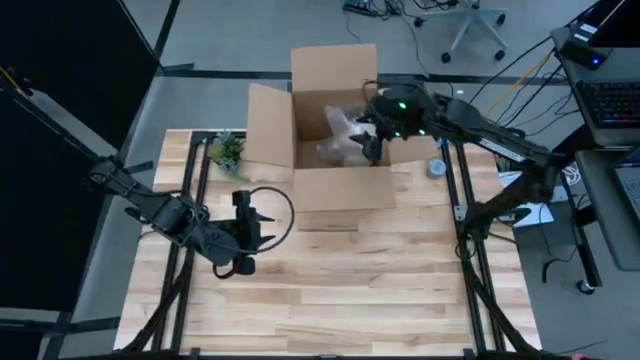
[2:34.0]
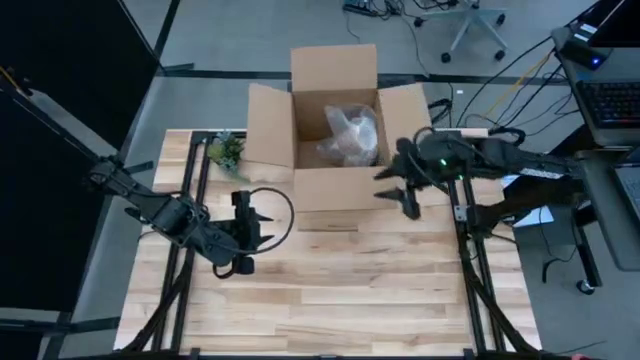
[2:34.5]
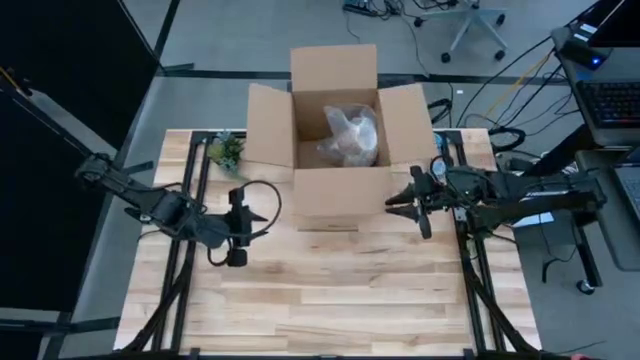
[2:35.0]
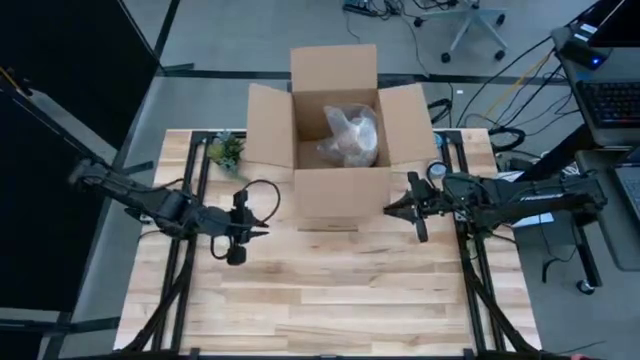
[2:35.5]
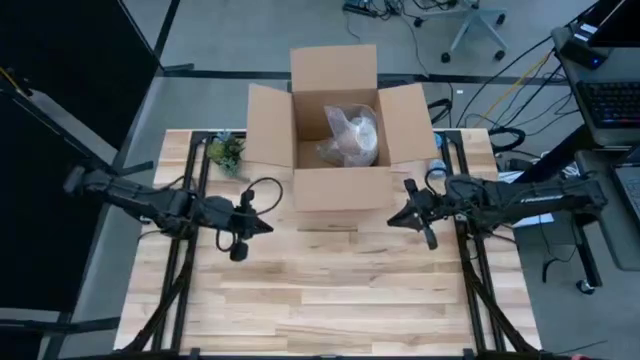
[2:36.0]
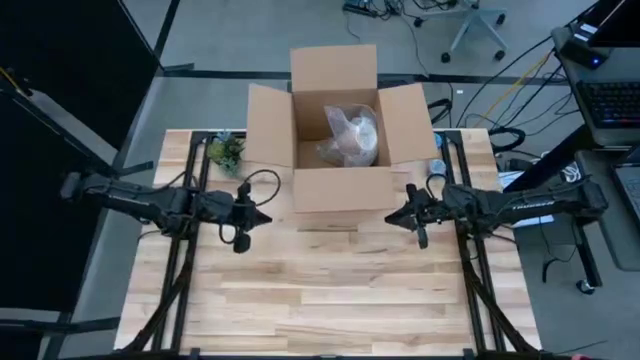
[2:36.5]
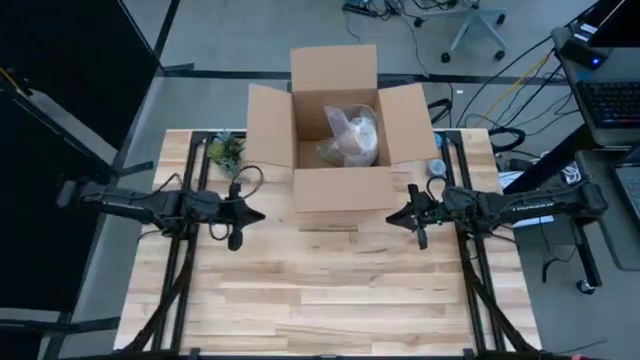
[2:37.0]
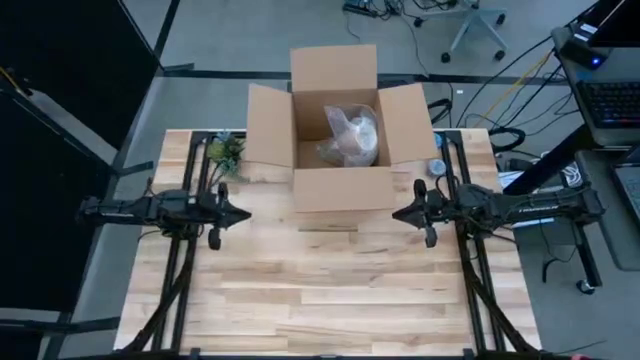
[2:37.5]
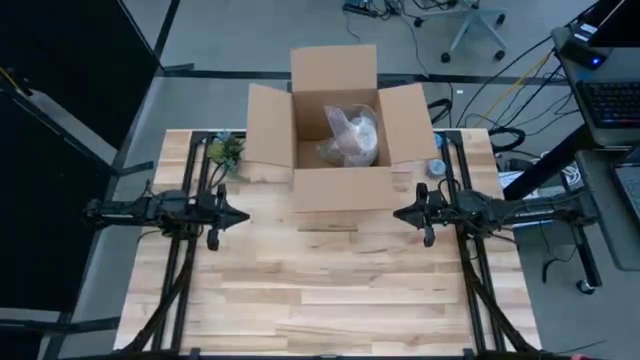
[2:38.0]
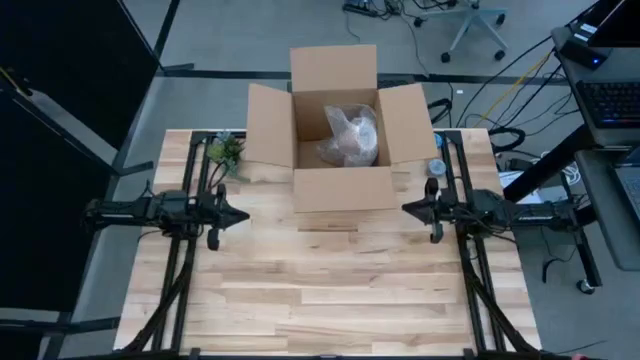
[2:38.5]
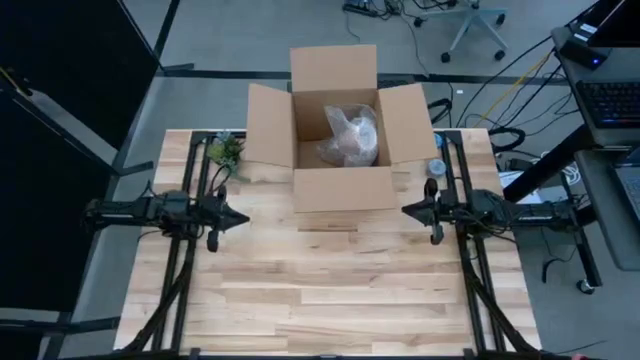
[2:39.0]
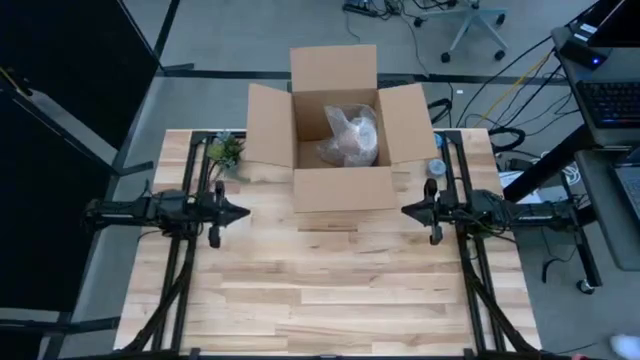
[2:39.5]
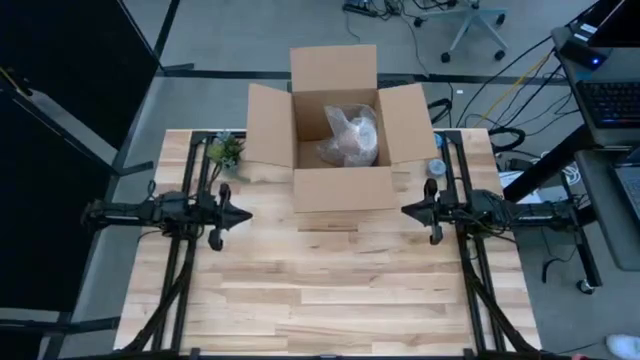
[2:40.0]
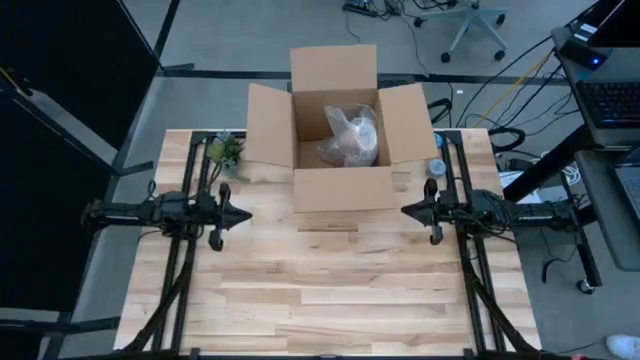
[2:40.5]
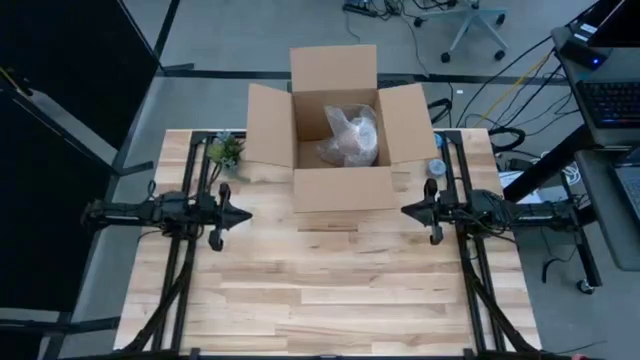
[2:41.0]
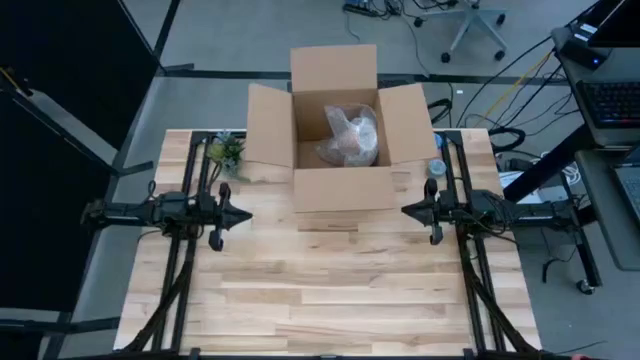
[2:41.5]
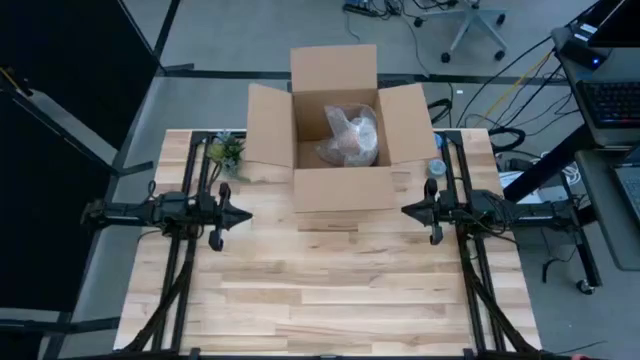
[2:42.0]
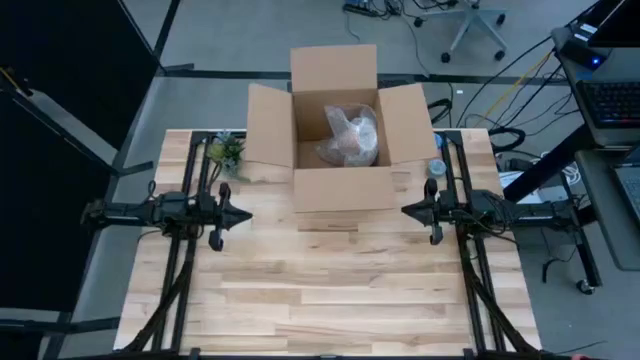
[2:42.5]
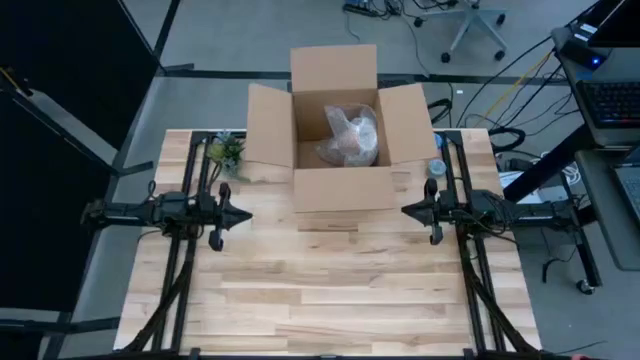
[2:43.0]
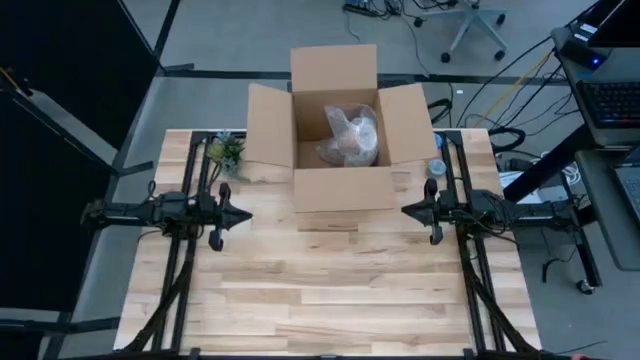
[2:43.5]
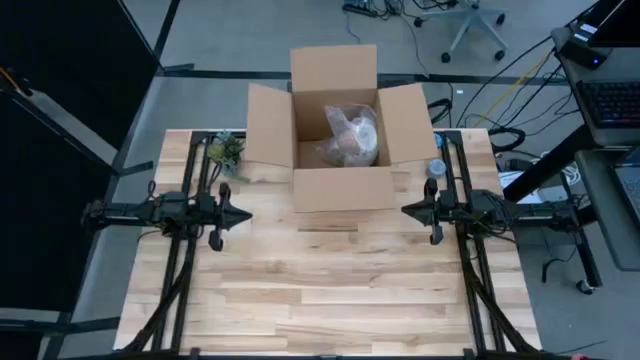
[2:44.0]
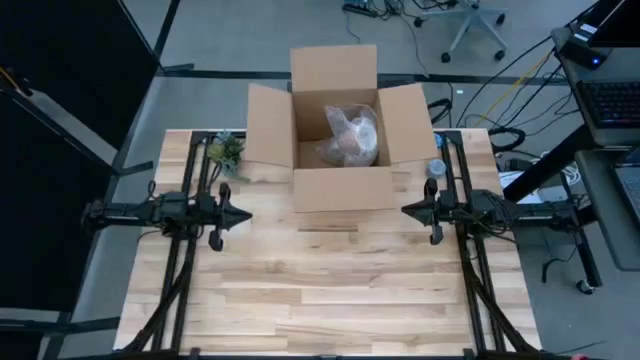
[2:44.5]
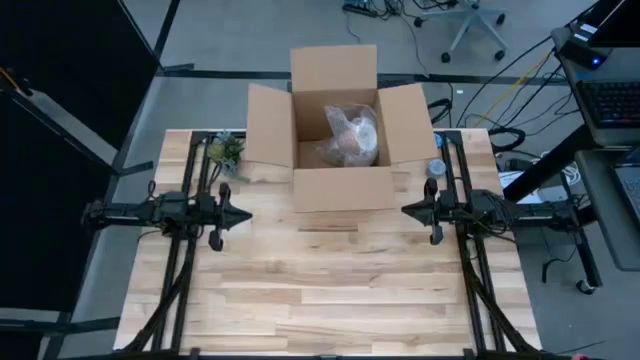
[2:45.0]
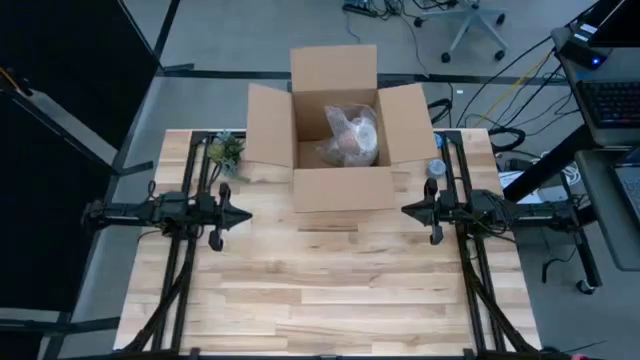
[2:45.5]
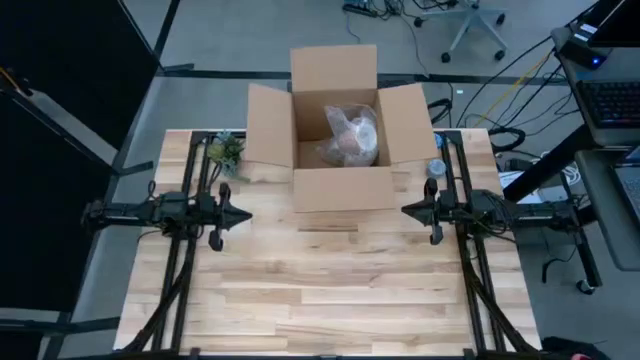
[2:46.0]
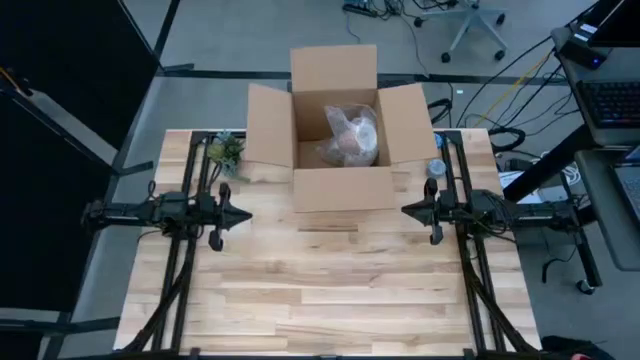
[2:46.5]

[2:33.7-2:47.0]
Task: wrap mug
Return to Home Position

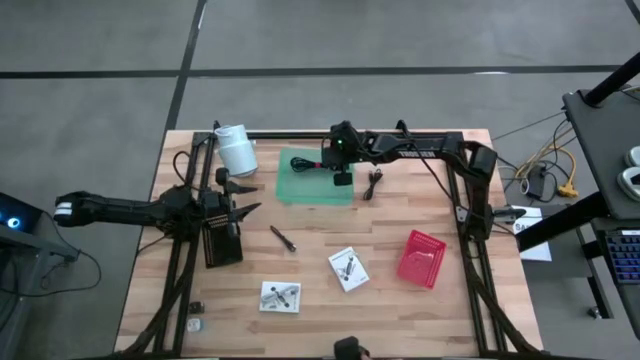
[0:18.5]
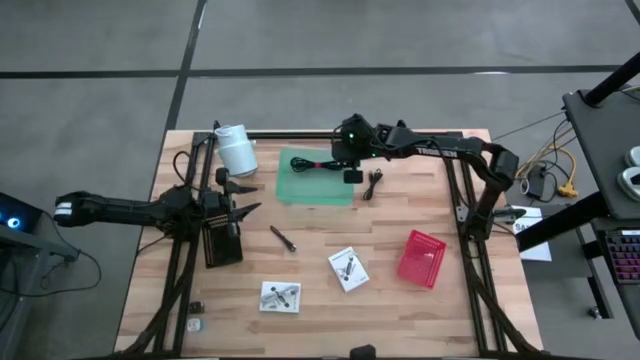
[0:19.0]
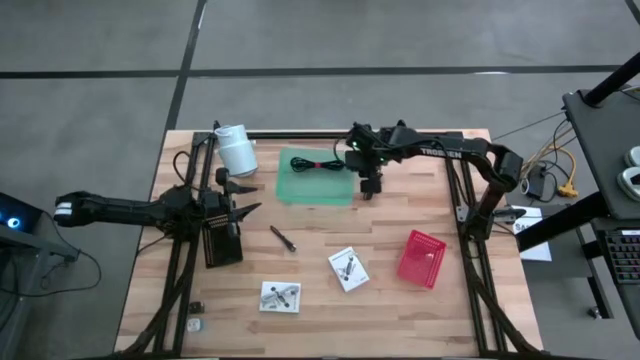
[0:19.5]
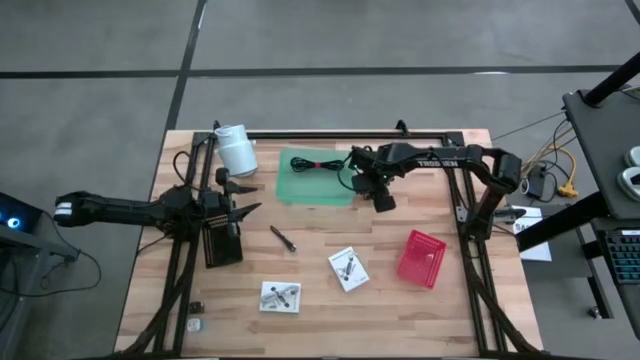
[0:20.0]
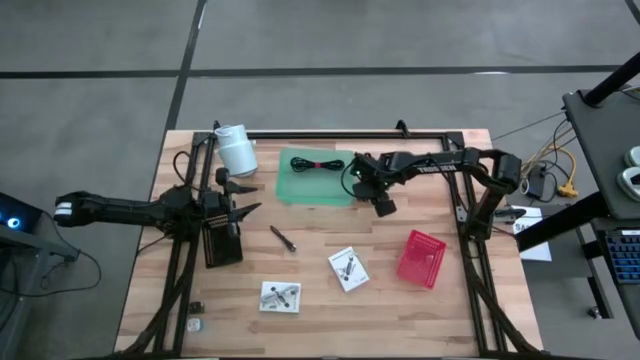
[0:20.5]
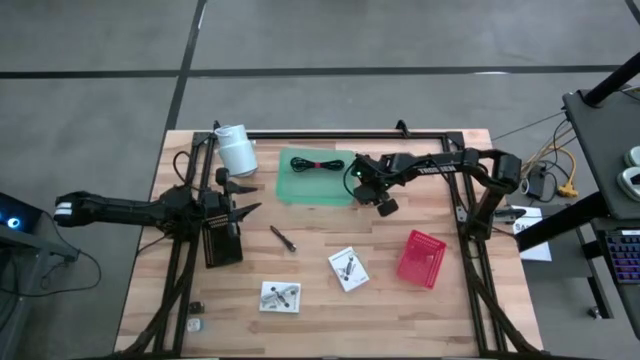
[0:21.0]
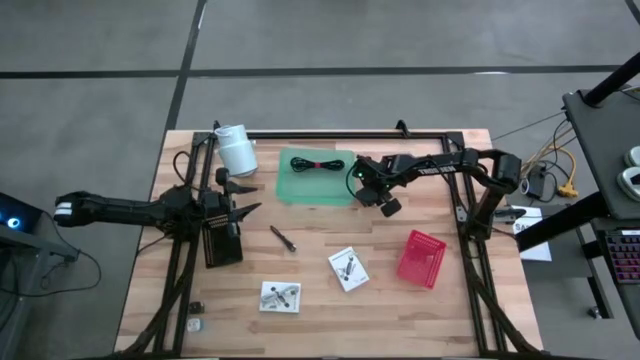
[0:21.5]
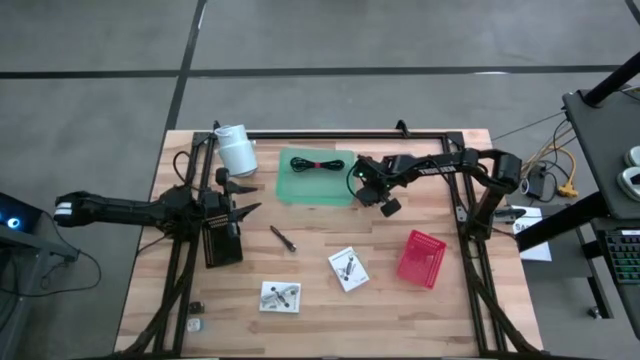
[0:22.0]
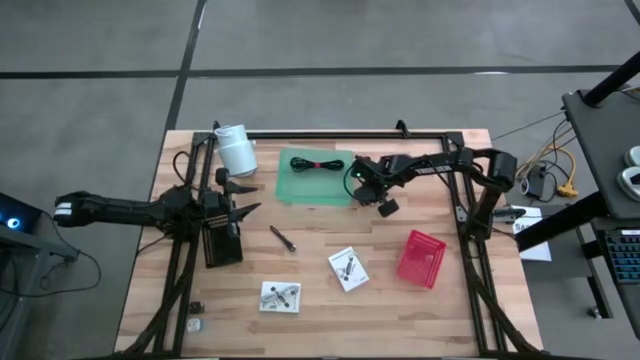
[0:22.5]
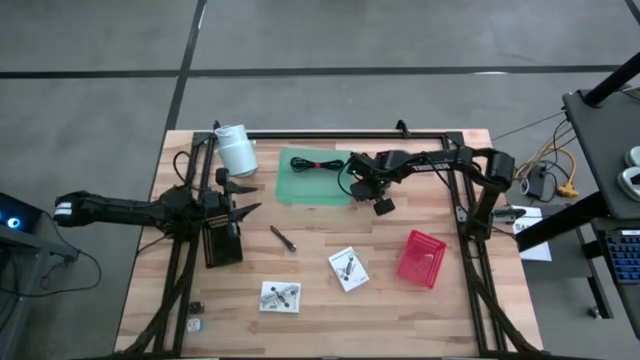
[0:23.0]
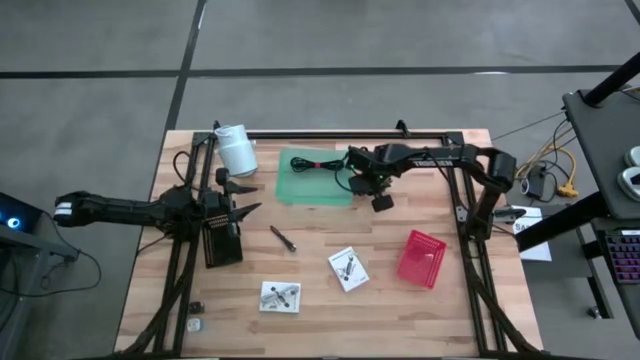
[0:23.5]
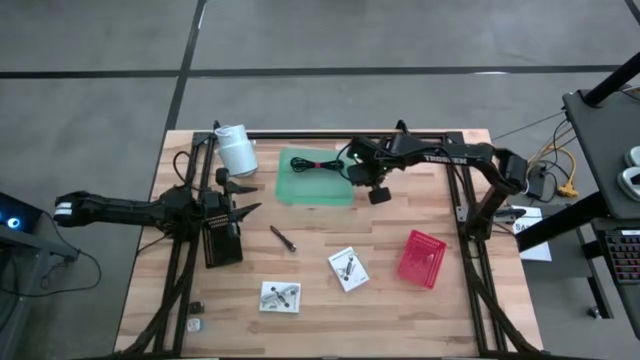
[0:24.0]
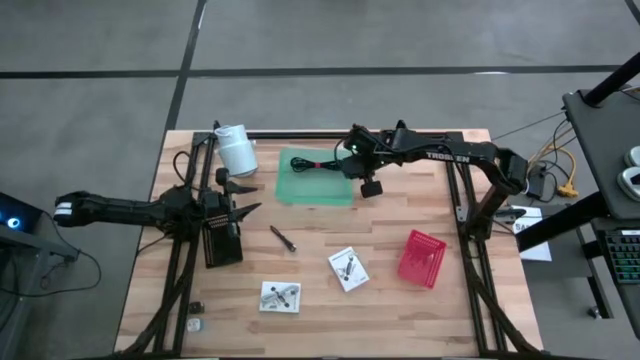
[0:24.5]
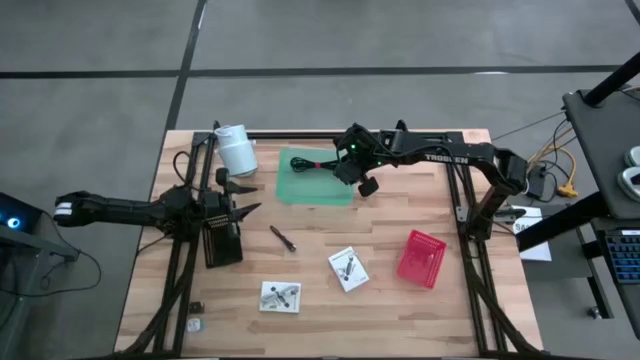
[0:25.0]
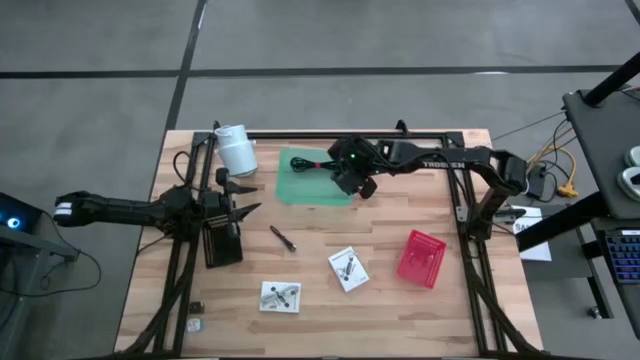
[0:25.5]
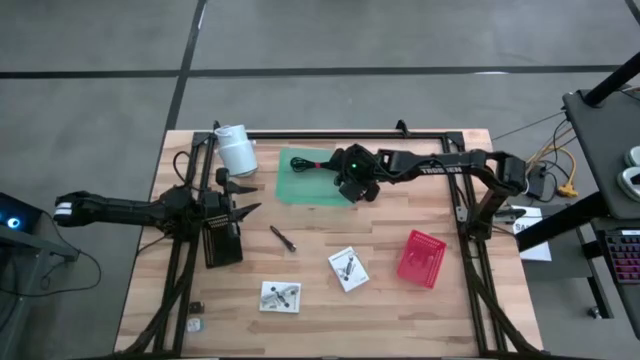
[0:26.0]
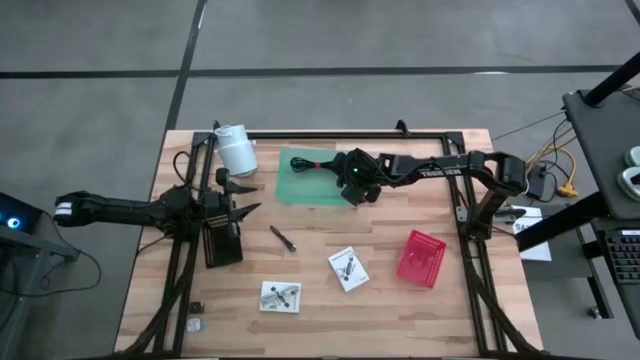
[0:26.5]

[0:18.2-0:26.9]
Task: Pick and place items into bin
Put the top black charger cable into the green bin
